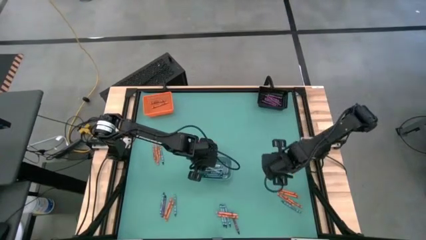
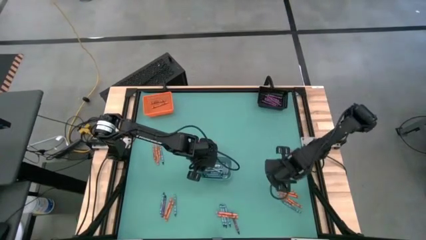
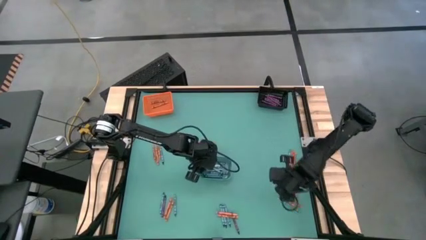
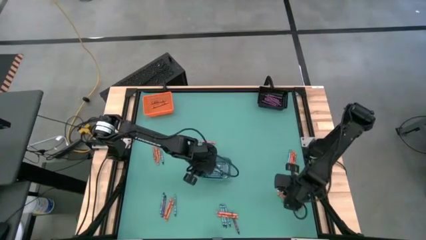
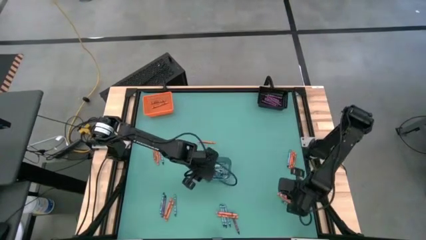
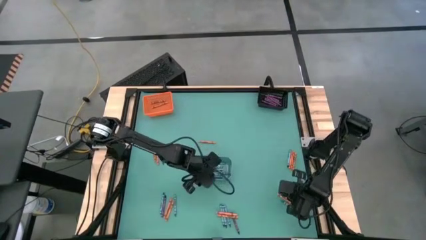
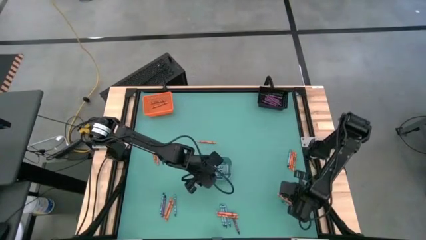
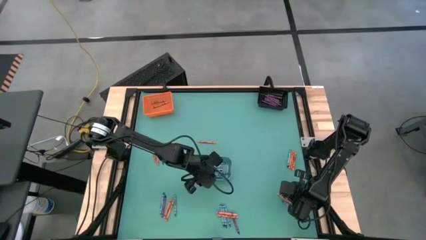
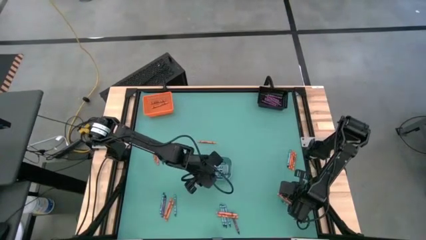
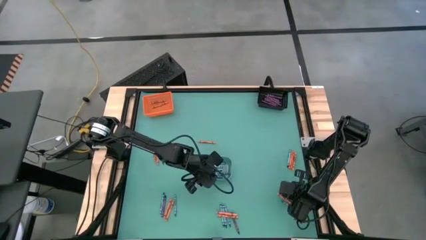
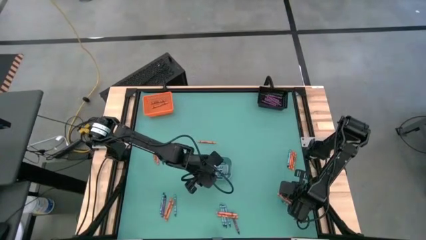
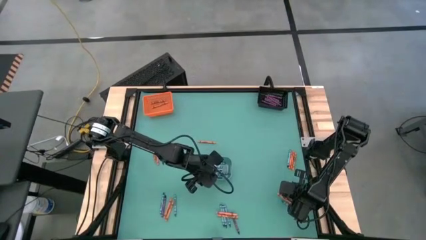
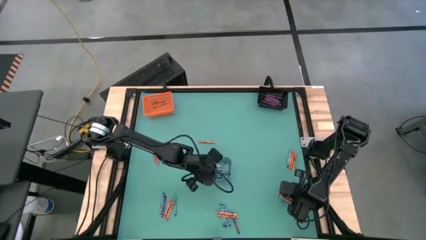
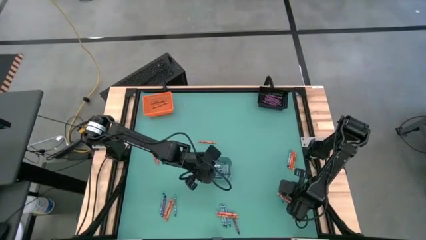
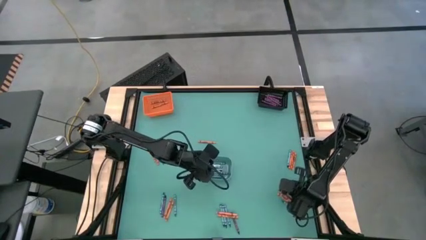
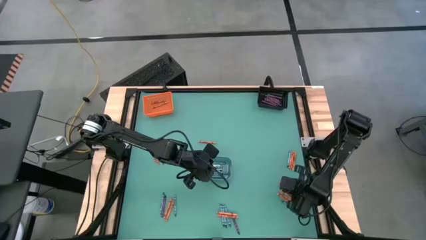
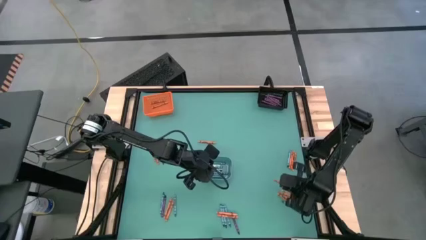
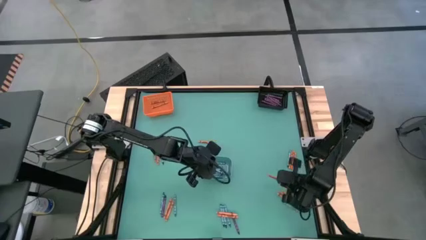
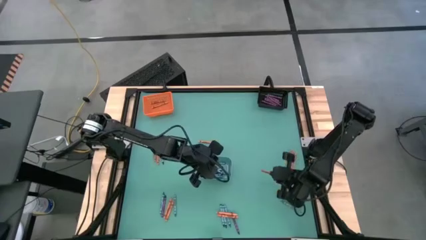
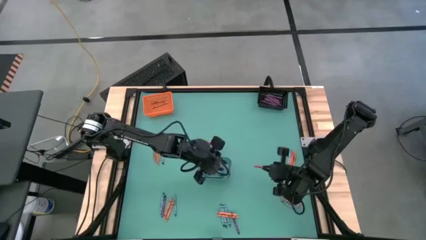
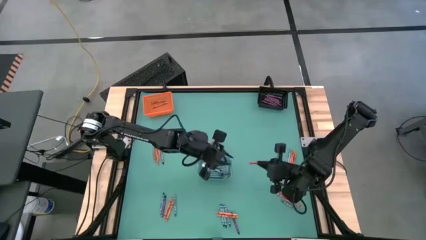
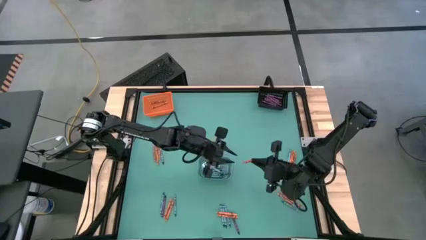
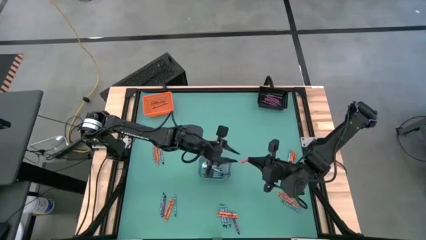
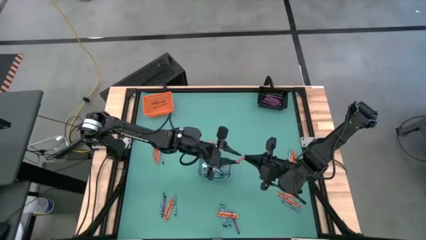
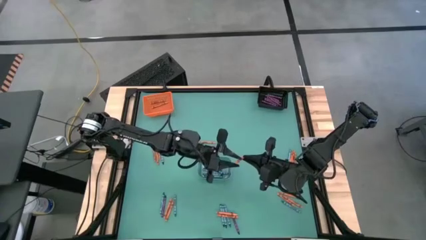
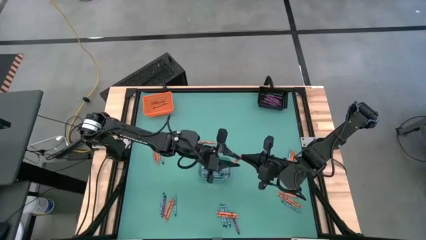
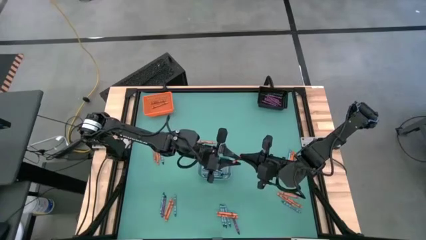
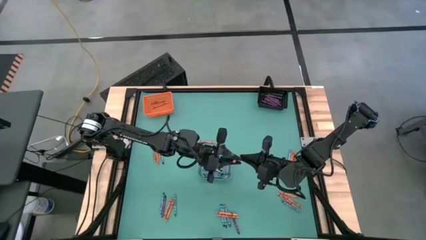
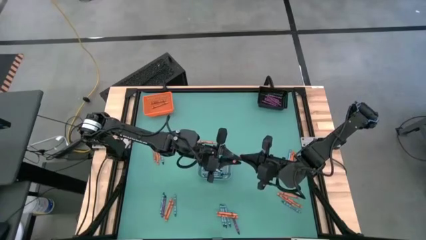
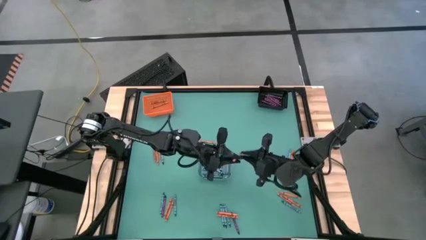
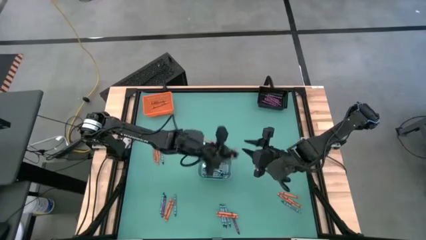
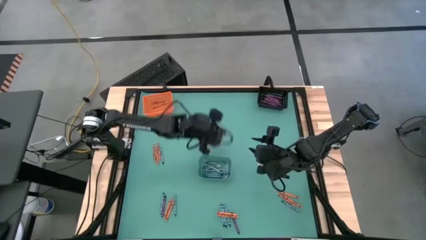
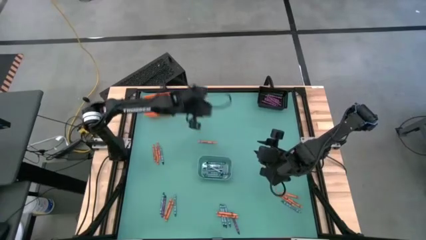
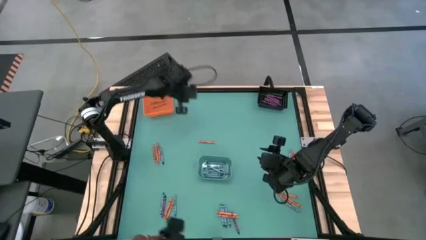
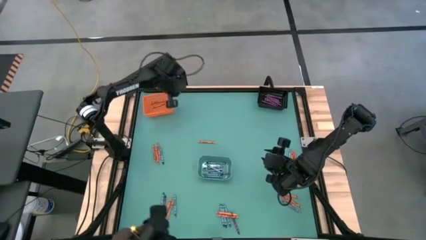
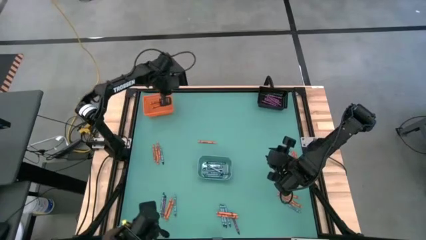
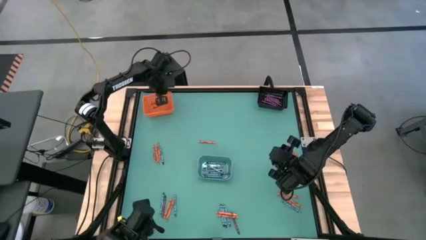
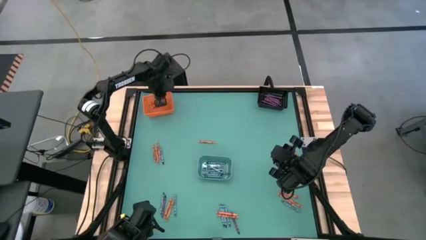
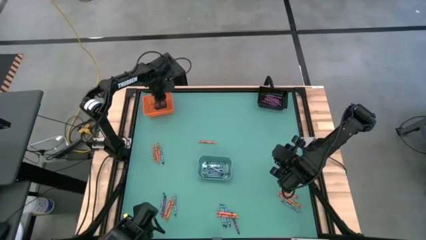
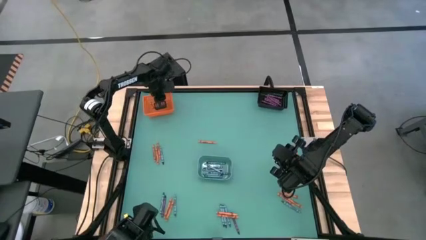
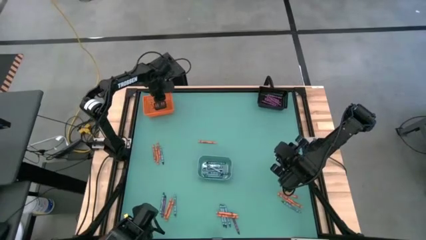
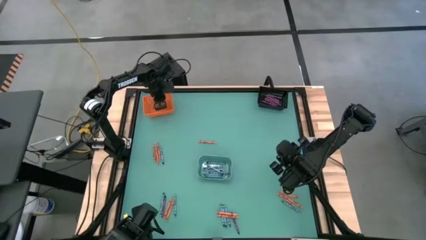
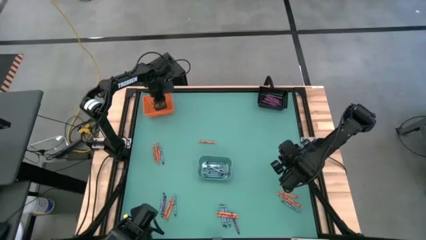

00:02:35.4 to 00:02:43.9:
Task: Sort crayons
Put the orange crayon into the orange bin

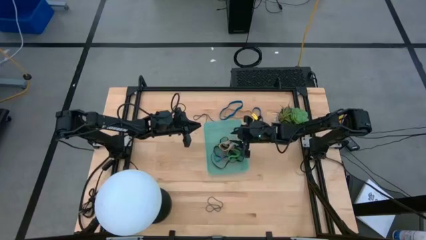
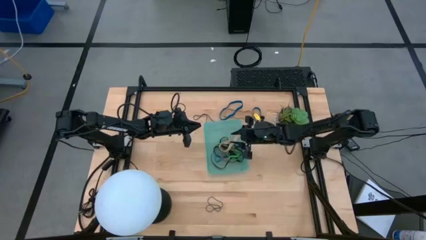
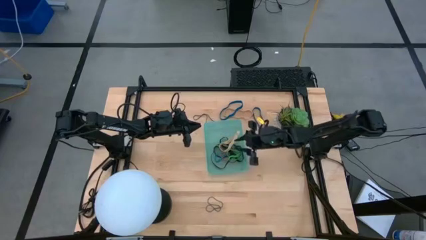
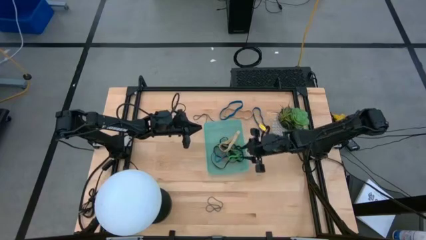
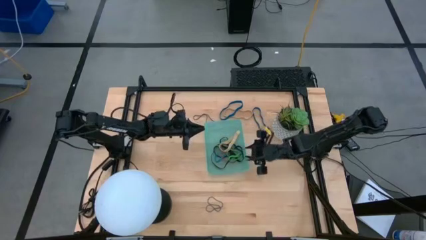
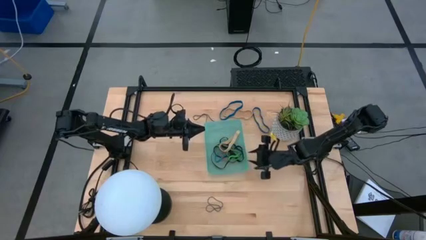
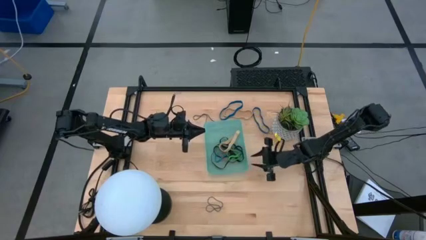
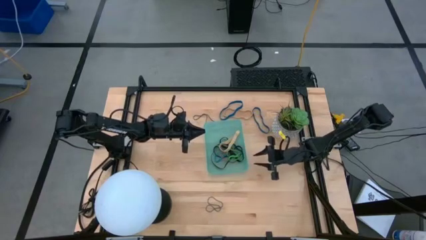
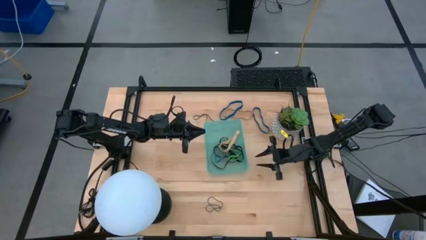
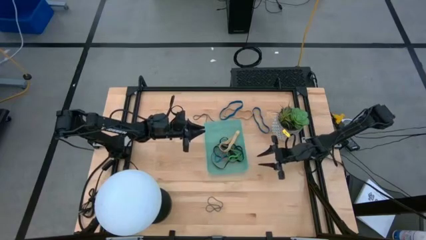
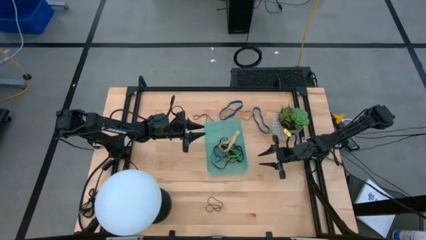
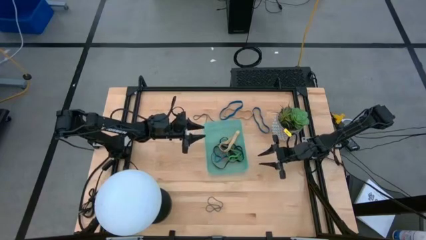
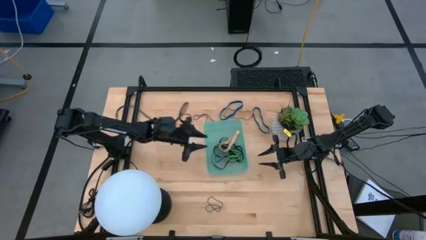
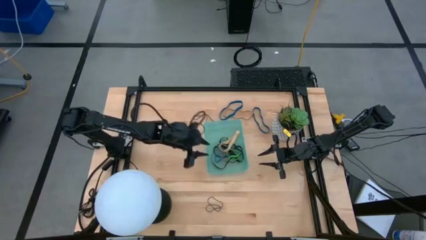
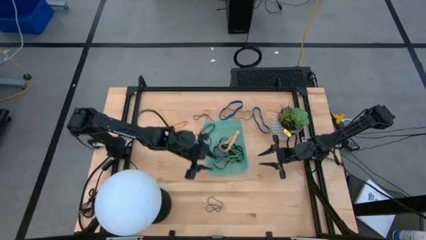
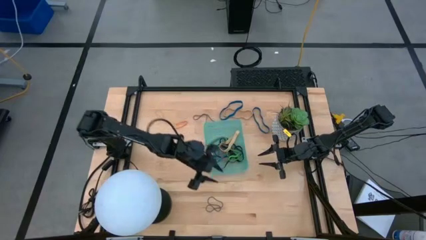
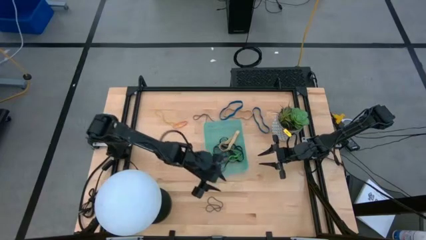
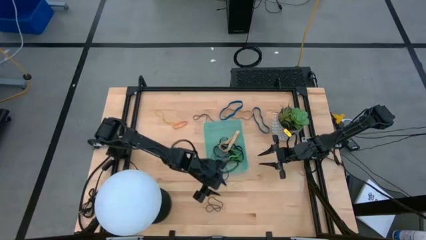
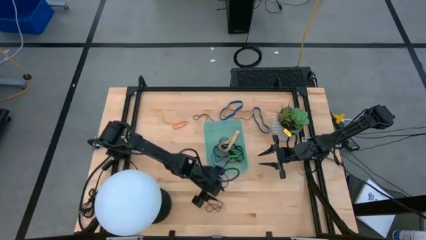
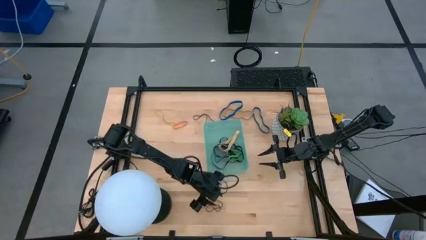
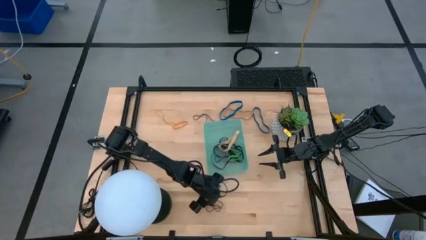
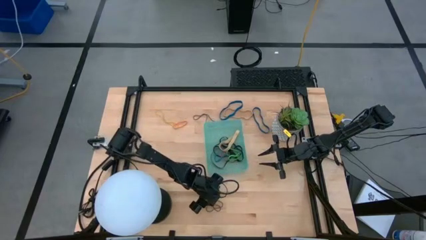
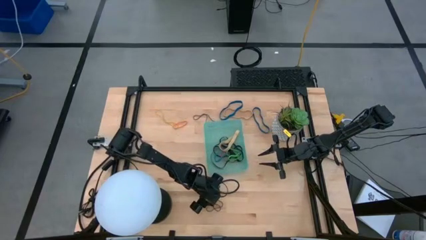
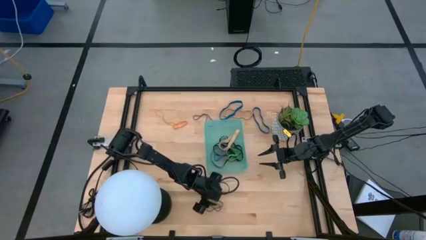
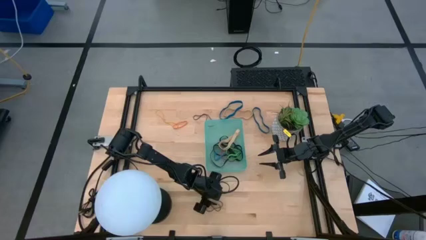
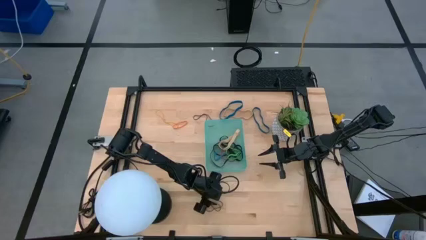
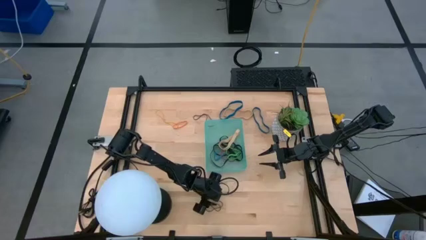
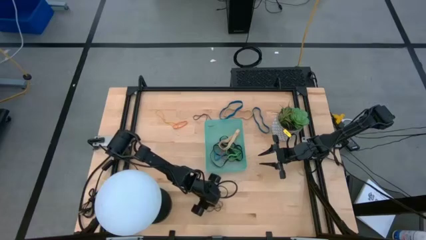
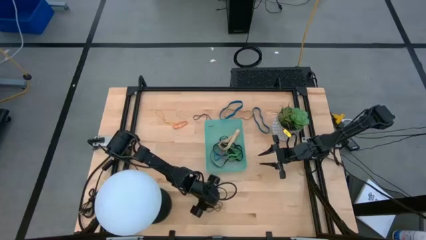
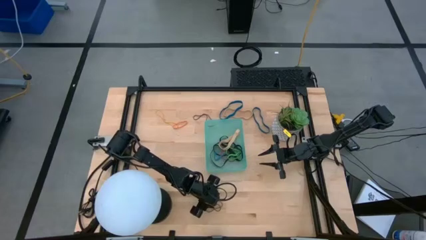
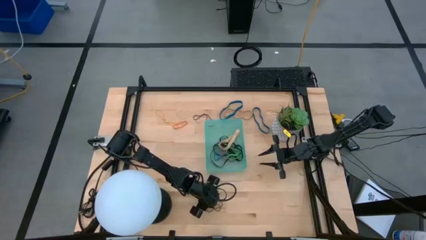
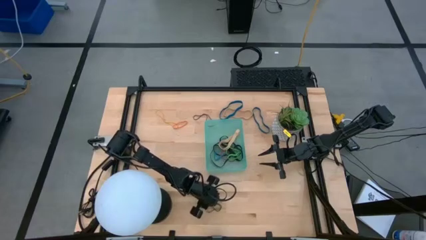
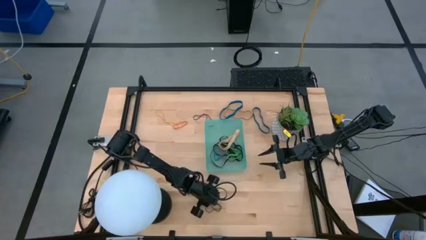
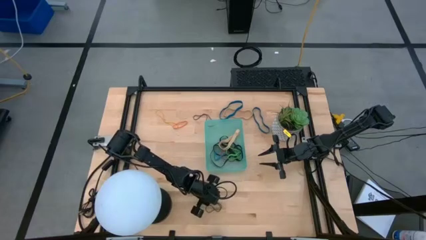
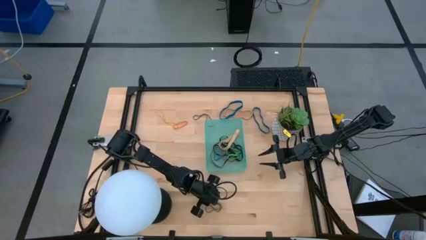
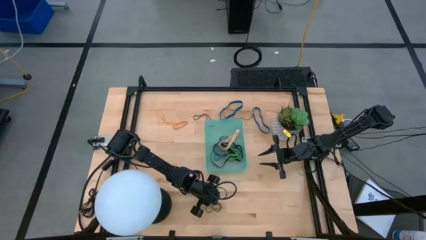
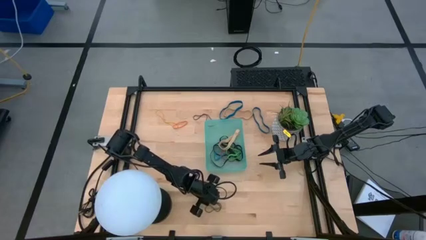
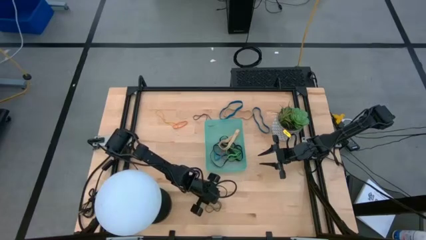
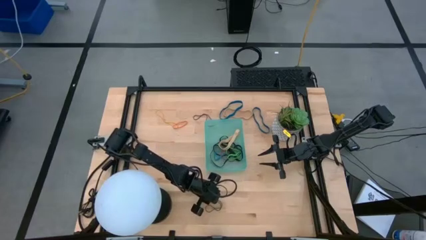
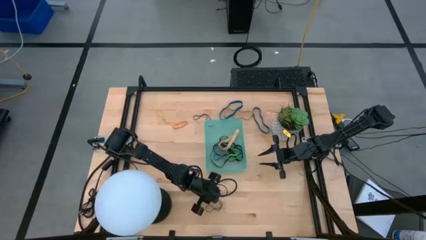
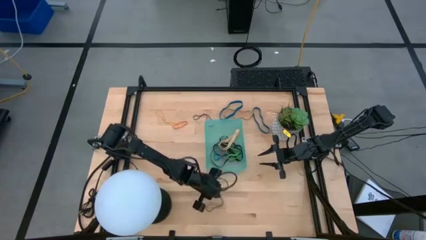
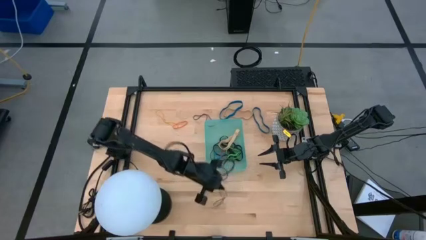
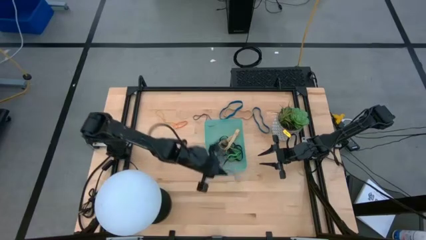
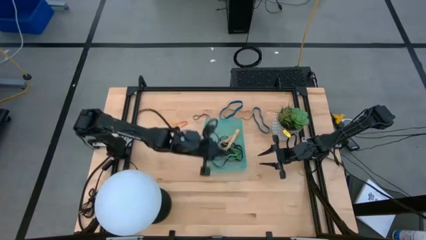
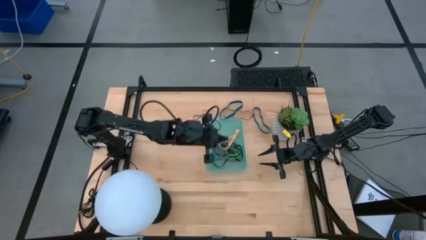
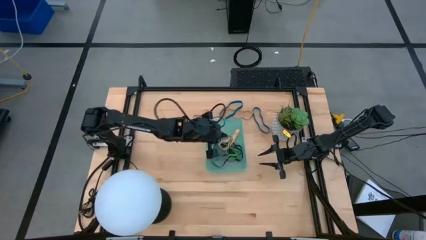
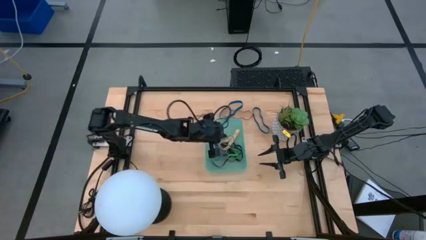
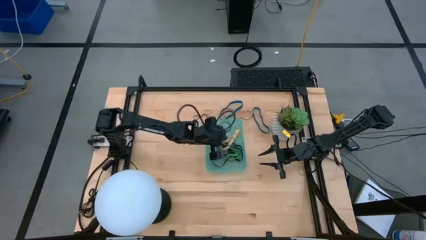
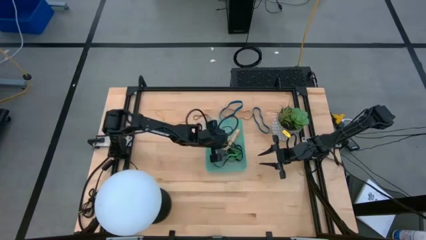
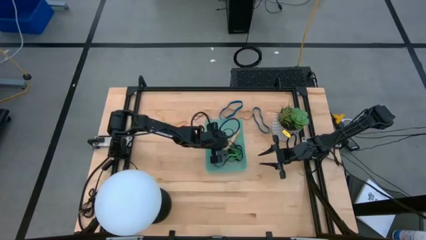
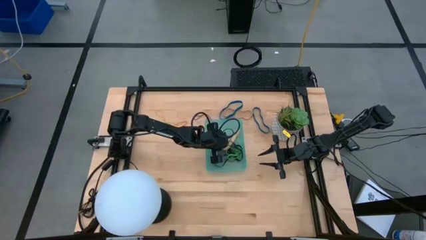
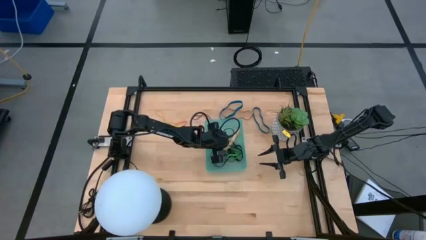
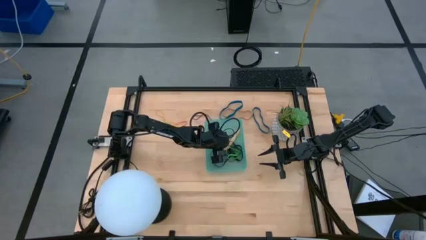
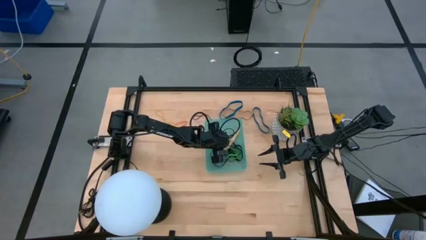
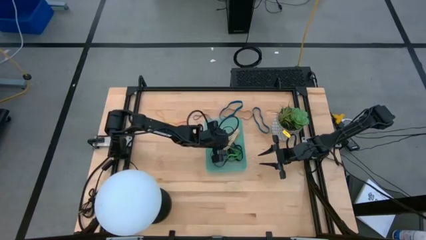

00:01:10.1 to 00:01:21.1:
Task: Pick and place rubber bands into bin
Put the violet rubber band into the green bin
